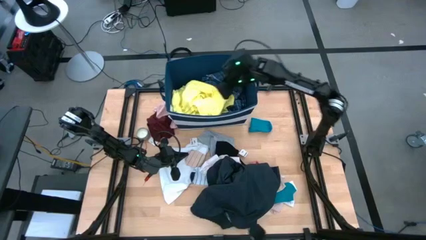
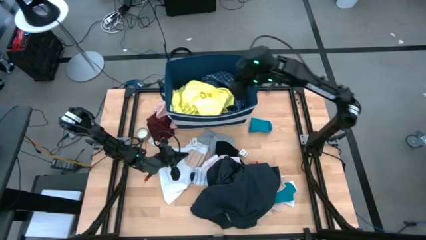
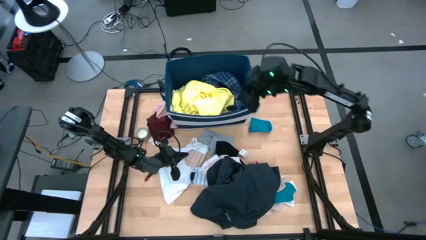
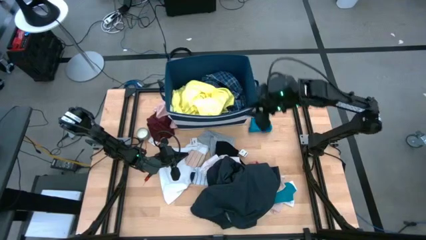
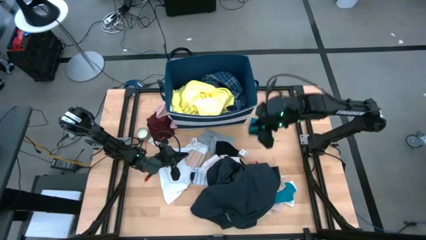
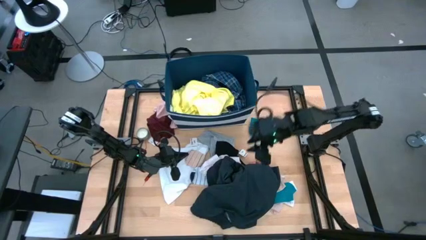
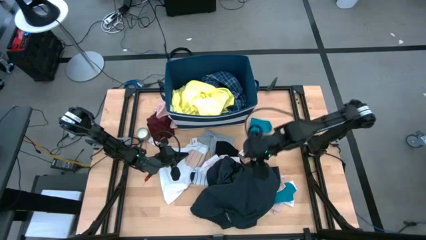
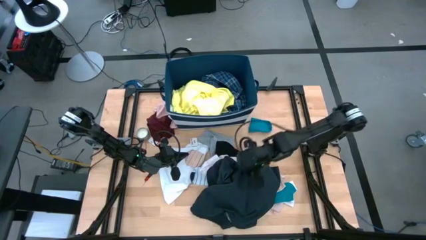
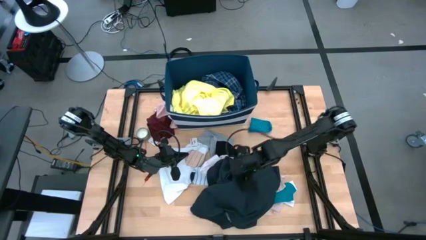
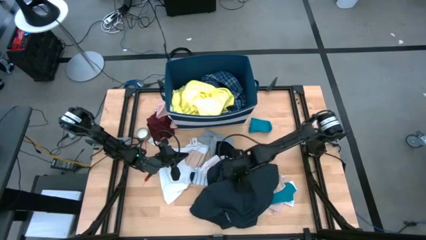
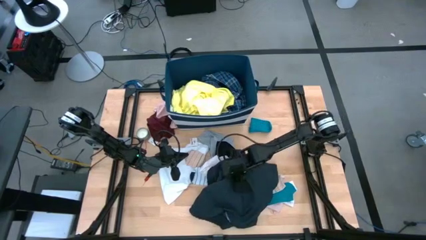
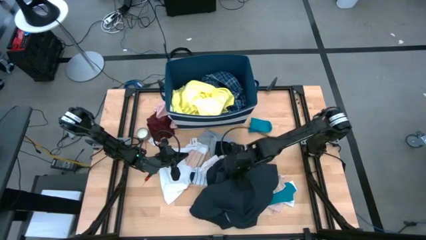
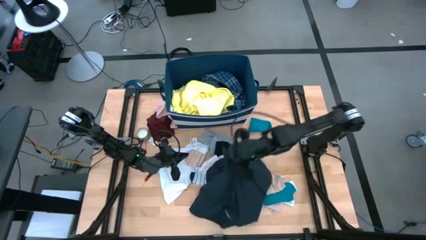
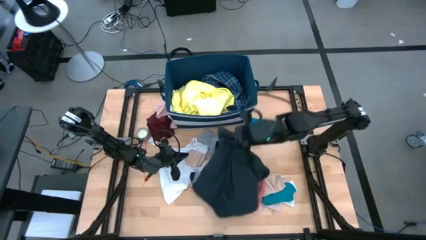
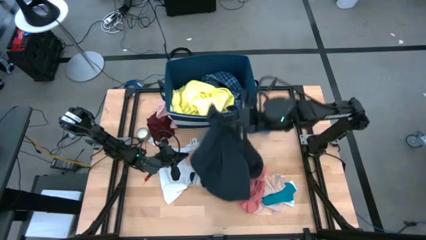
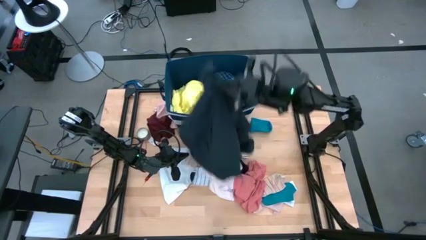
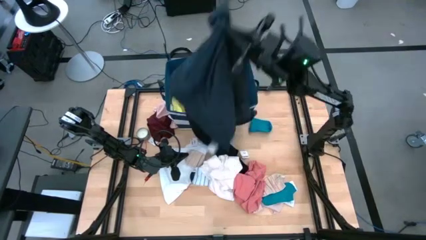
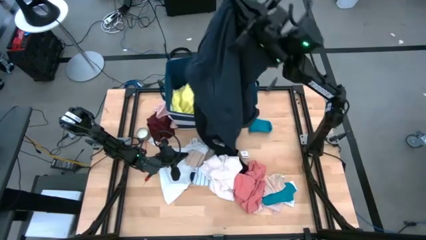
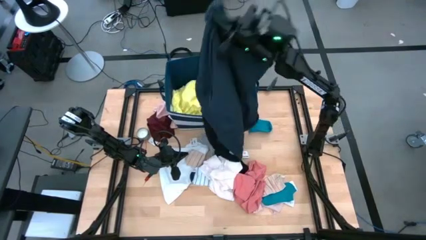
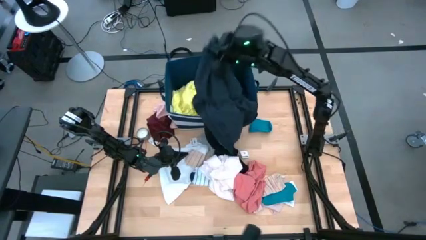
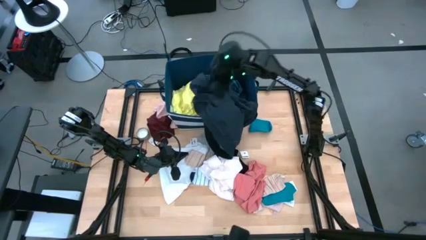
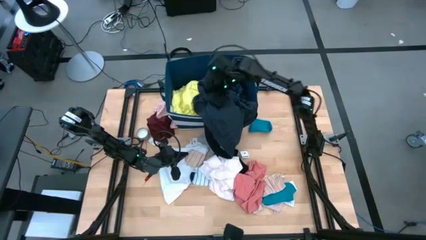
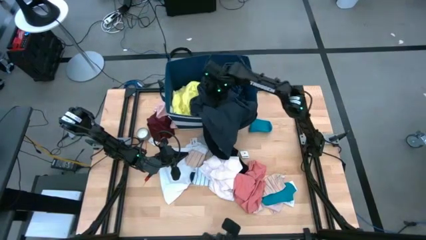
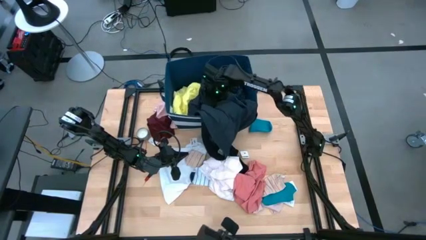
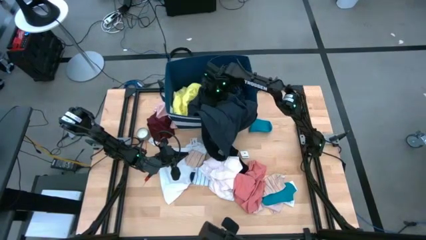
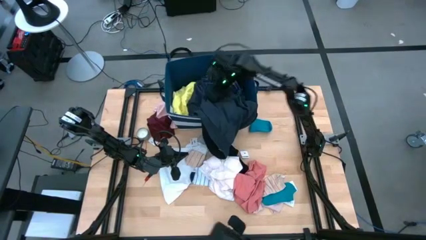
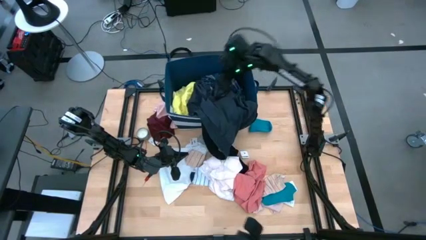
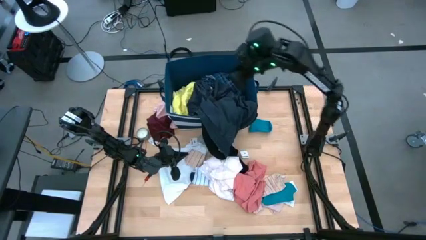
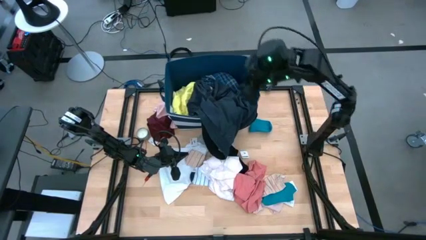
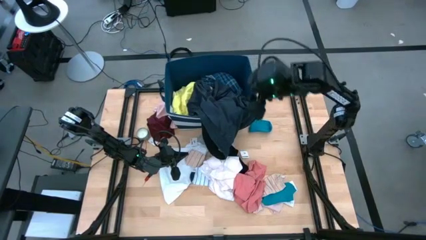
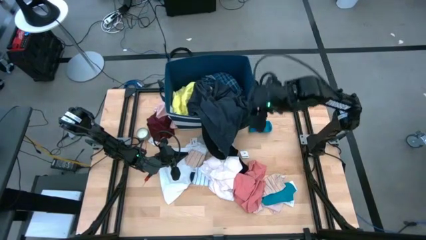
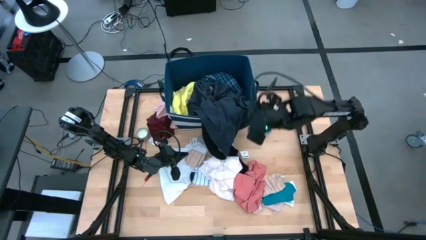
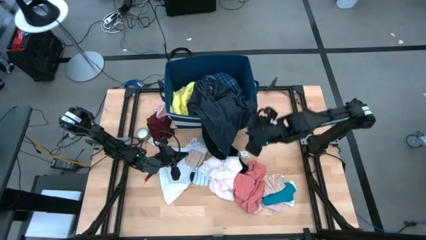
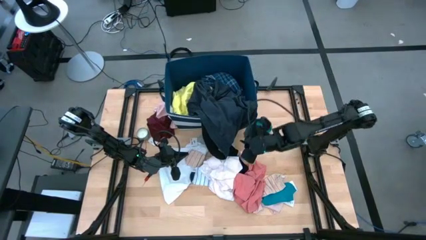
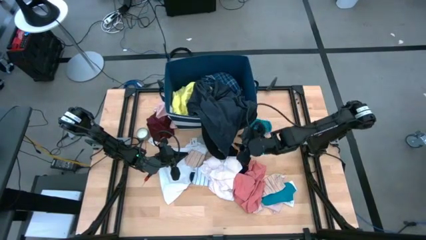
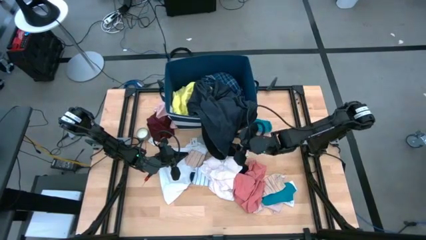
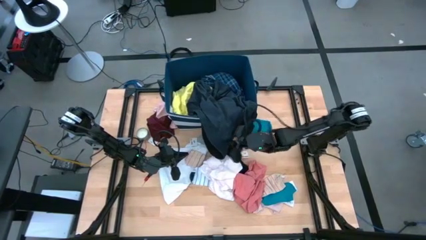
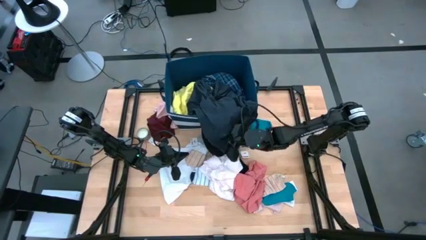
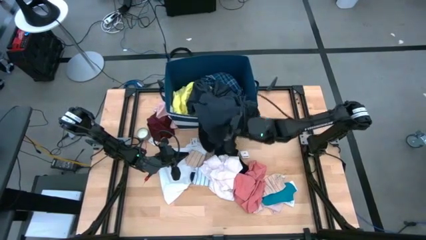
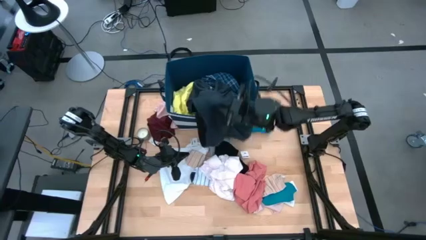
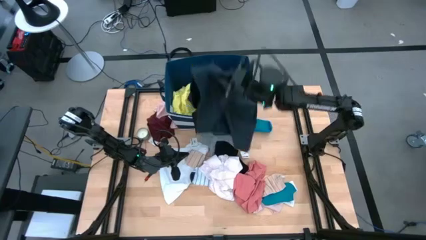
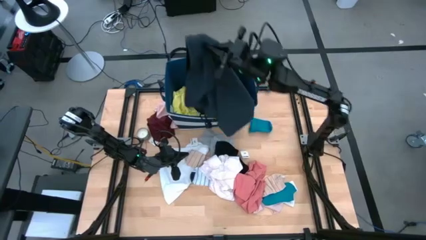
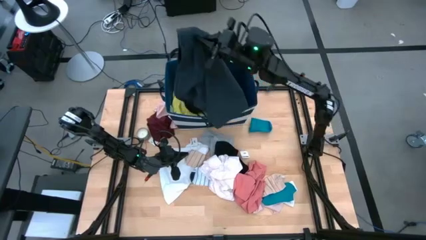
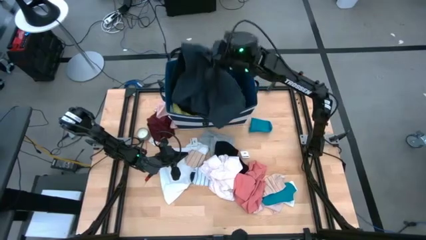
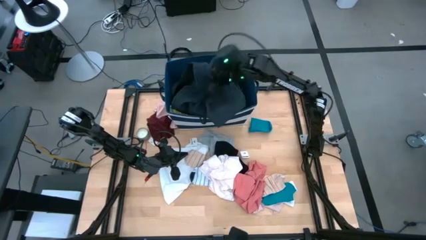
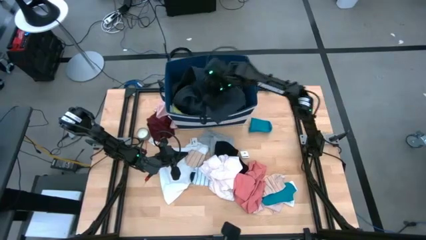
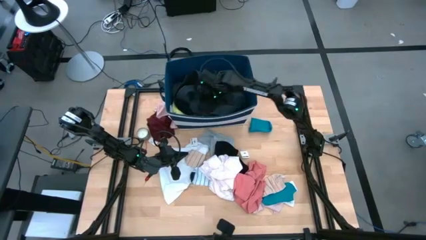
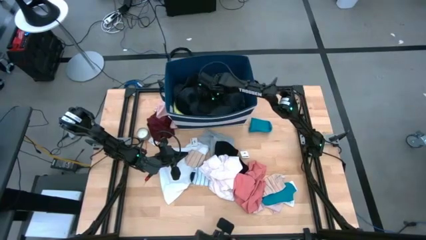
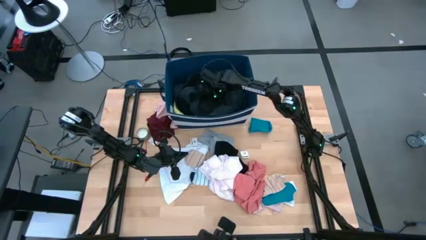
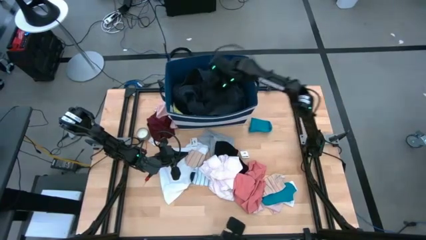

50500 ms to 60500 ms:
Task: Sort clothes
Put the black short into the blue laundry bin

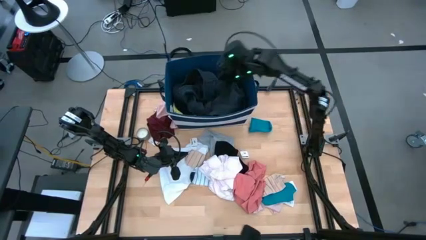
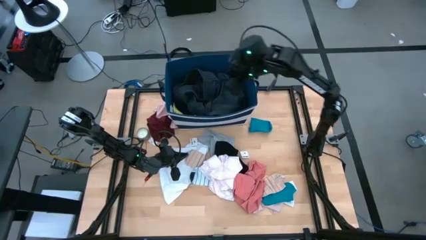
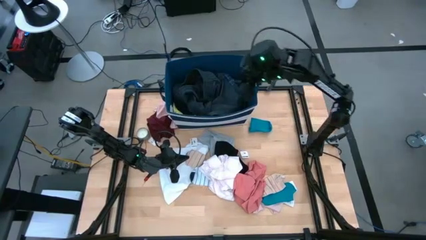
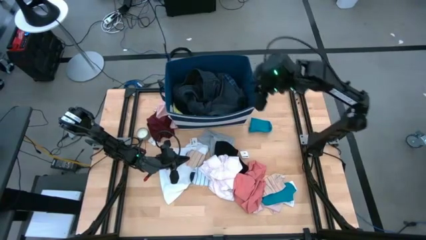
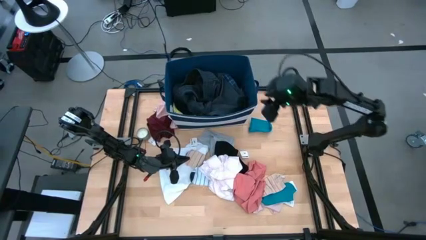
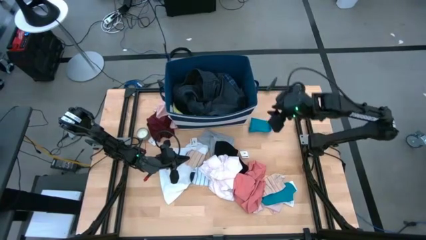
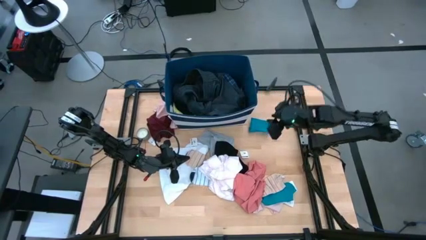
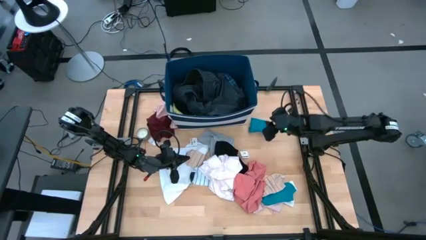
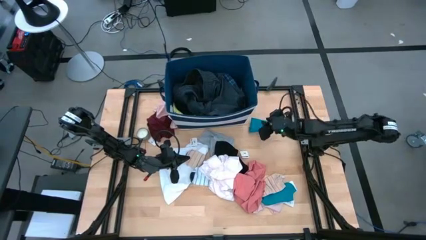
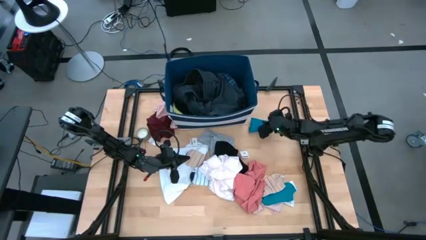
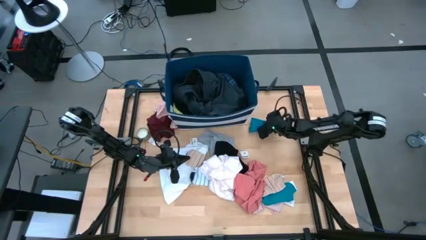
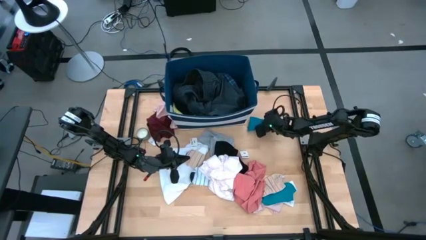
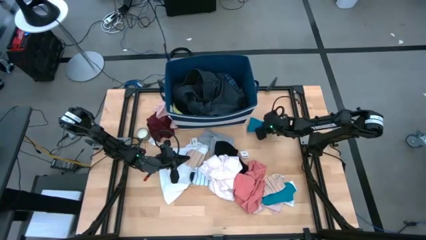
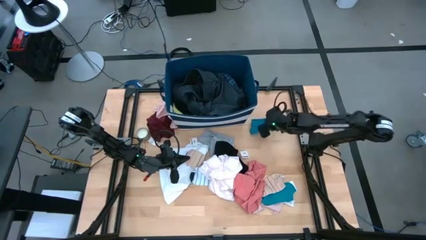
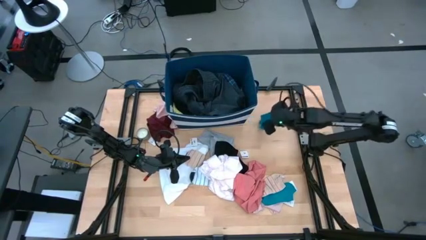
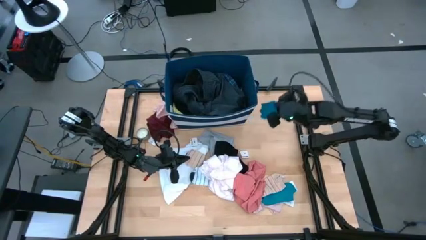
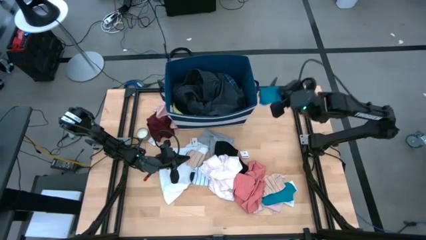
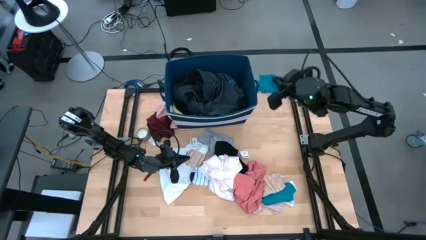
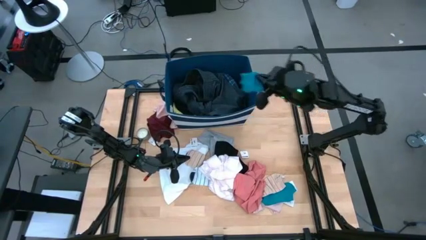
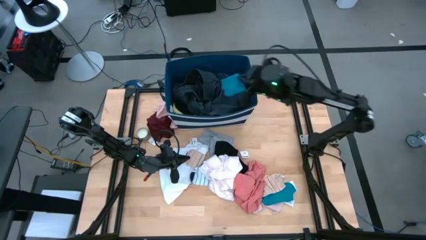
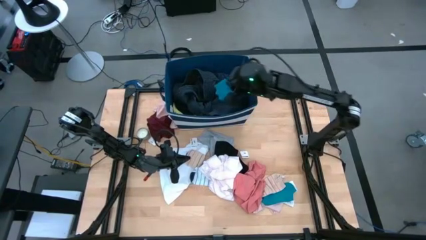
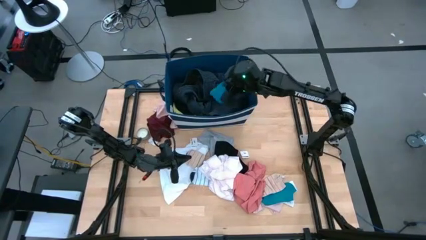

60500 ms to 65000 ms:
Put the top blue sock into the blue laundry bin

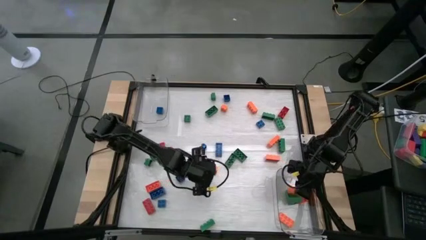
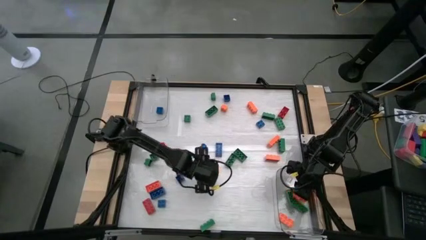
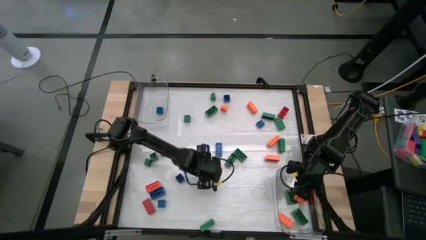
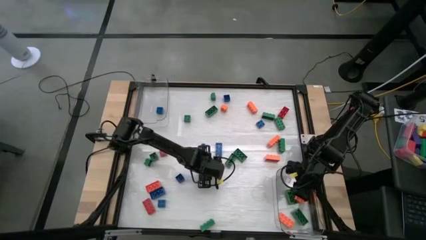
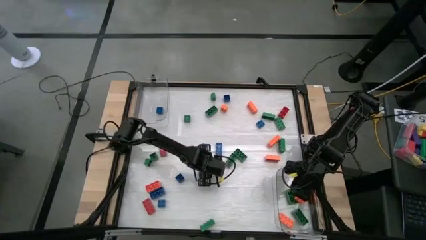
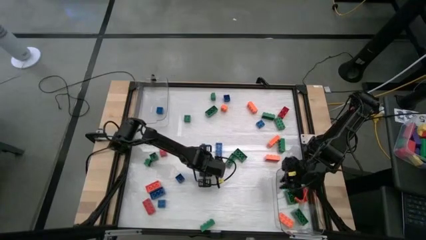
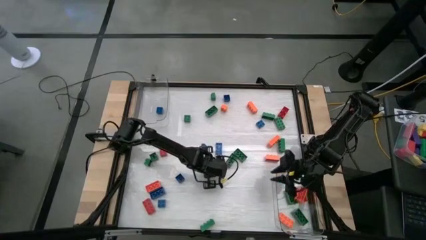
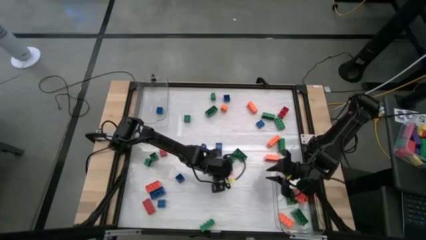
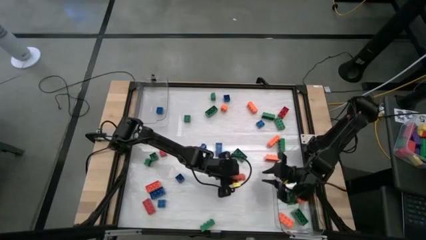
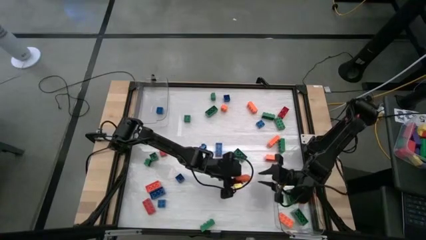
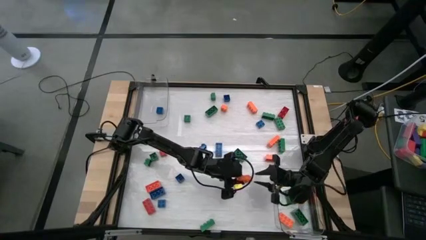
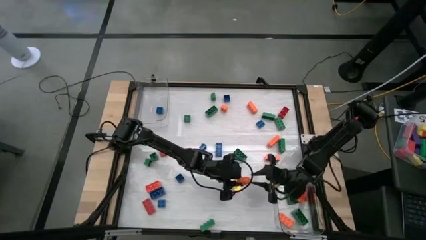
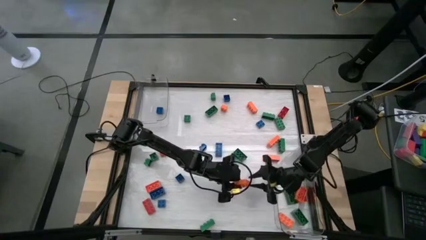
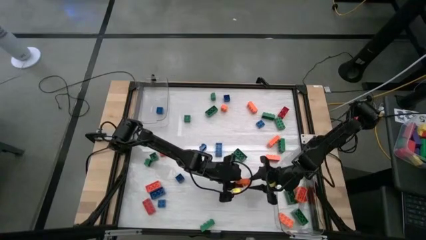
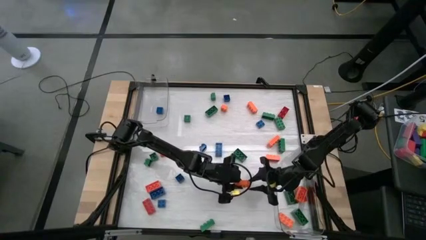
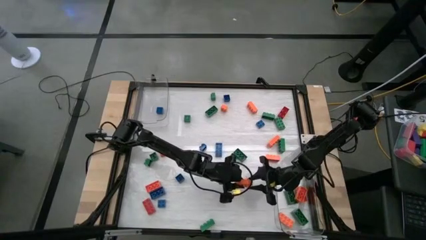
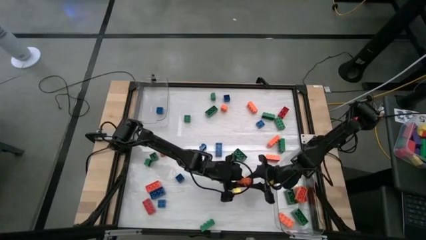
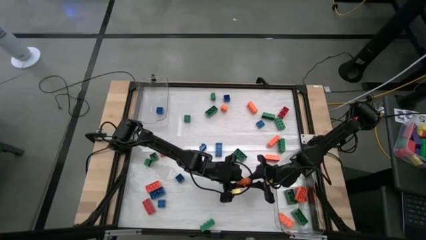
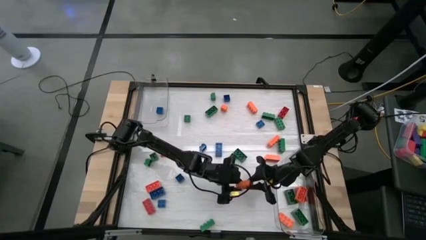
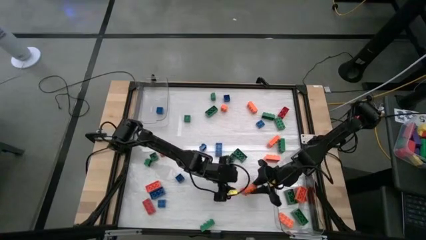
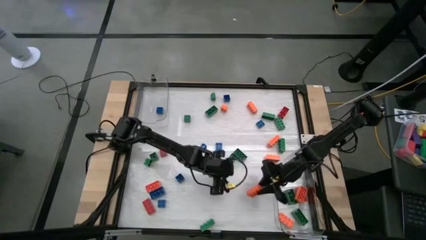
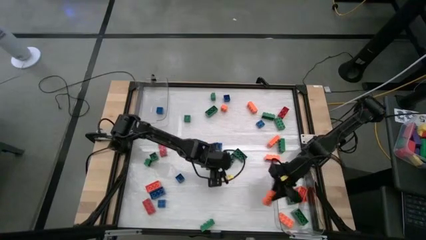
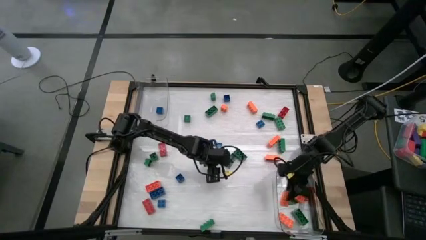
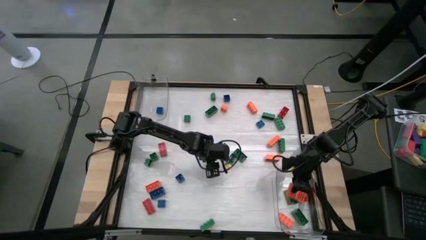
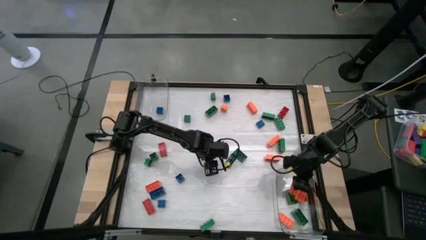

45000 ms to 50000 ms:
Task: Sort blocks by size
Put the 8 stud orange game piece into the bottom transparent bin
